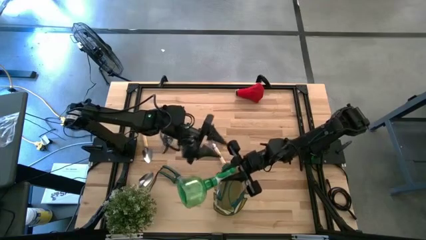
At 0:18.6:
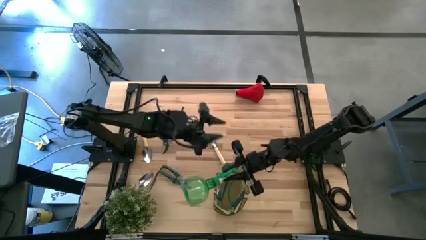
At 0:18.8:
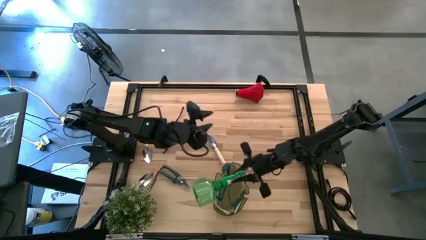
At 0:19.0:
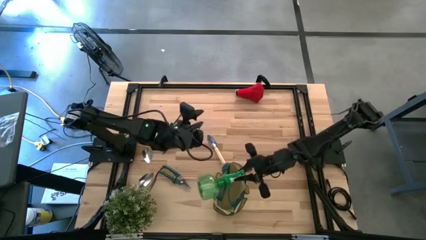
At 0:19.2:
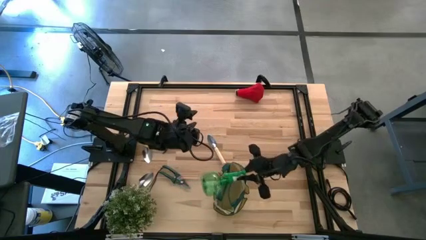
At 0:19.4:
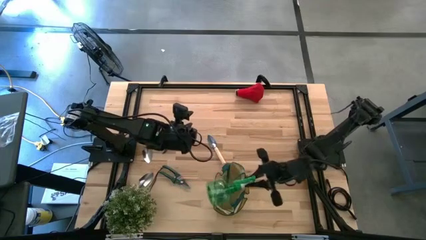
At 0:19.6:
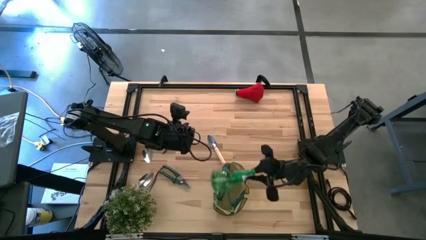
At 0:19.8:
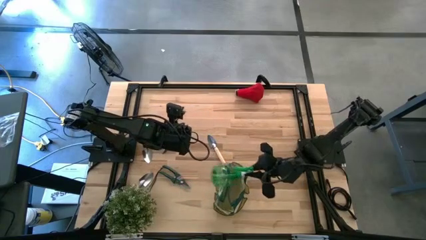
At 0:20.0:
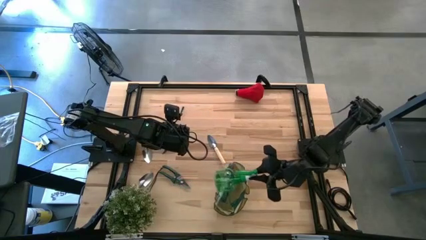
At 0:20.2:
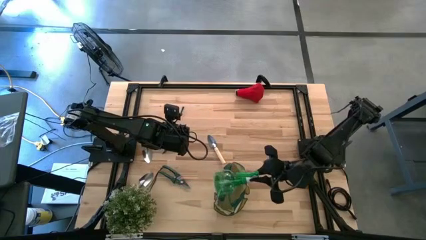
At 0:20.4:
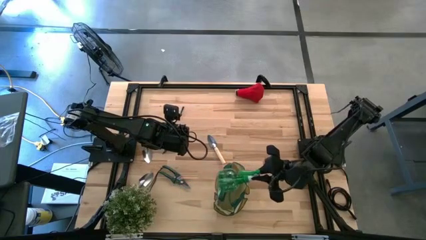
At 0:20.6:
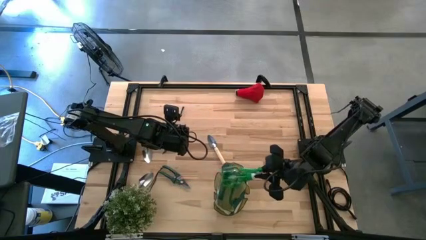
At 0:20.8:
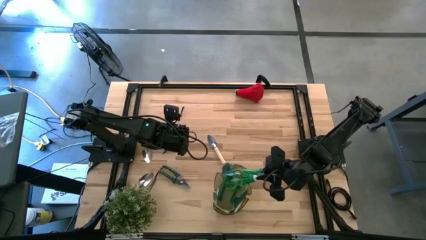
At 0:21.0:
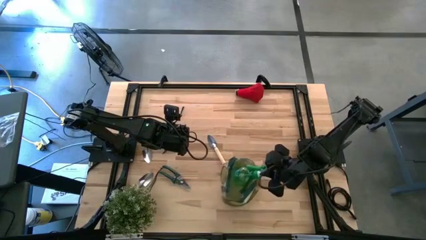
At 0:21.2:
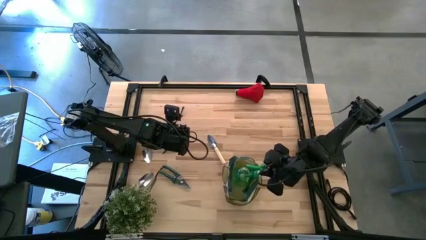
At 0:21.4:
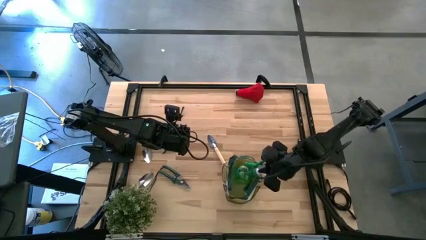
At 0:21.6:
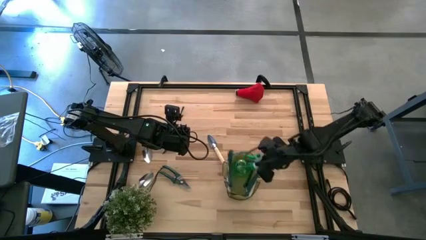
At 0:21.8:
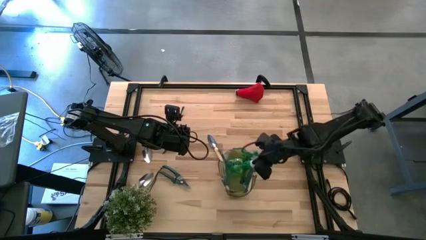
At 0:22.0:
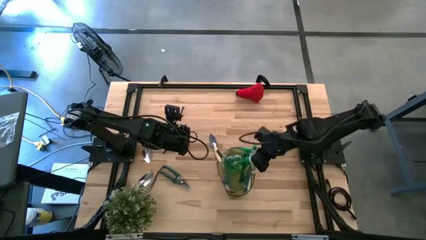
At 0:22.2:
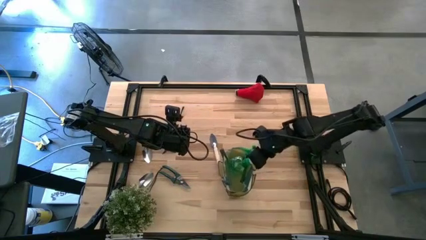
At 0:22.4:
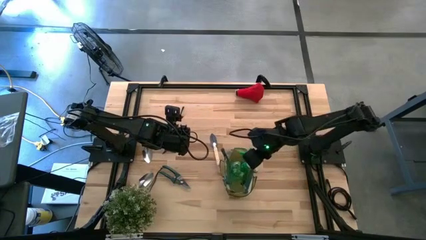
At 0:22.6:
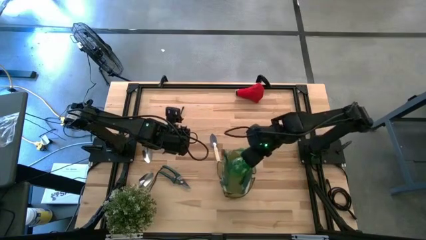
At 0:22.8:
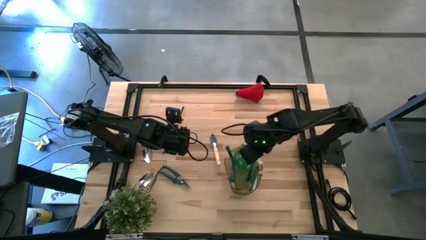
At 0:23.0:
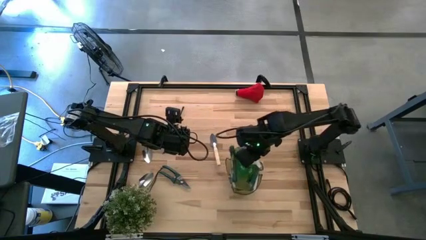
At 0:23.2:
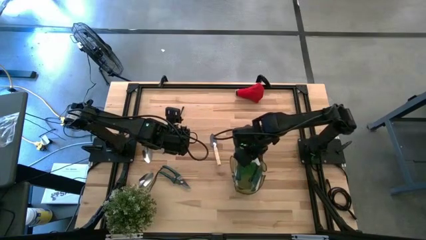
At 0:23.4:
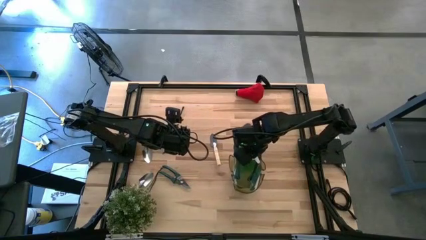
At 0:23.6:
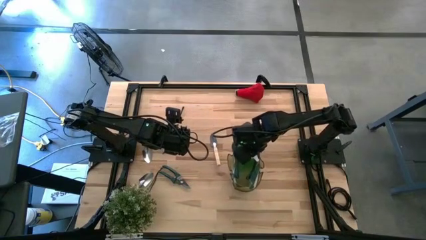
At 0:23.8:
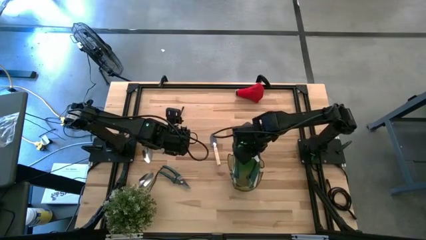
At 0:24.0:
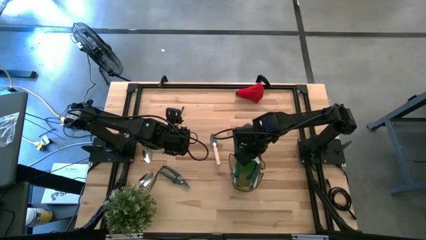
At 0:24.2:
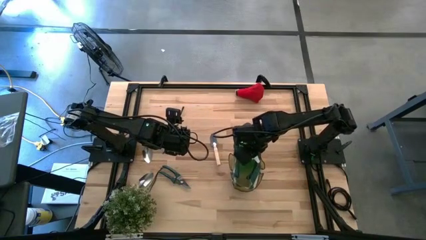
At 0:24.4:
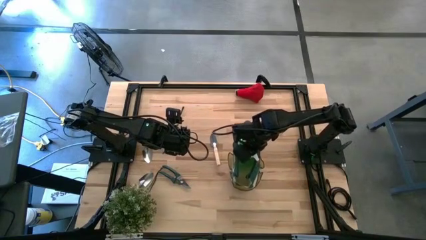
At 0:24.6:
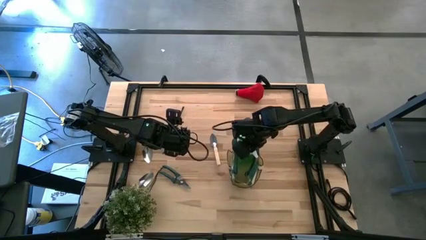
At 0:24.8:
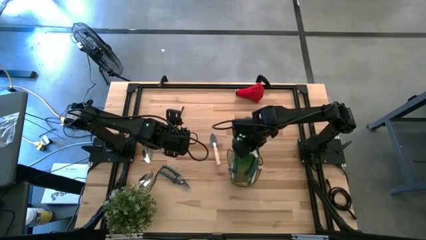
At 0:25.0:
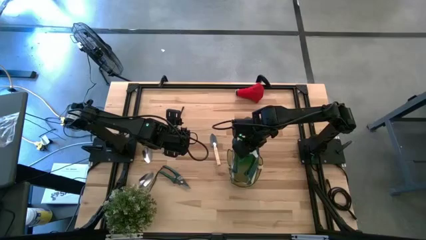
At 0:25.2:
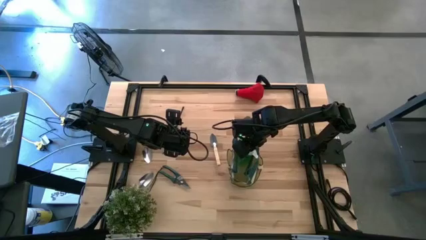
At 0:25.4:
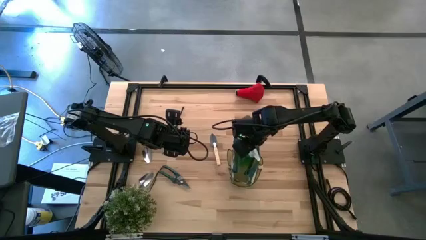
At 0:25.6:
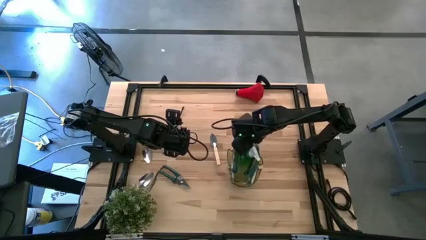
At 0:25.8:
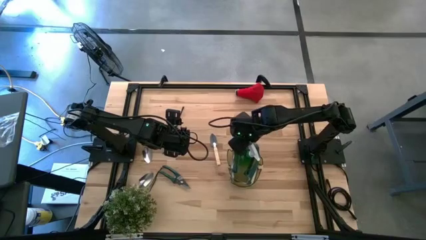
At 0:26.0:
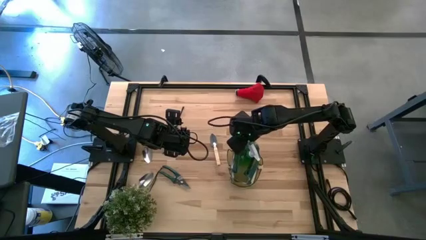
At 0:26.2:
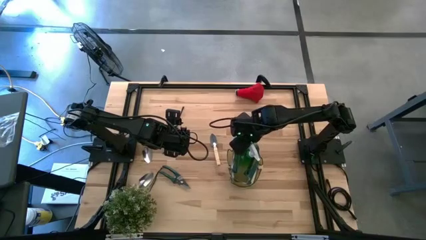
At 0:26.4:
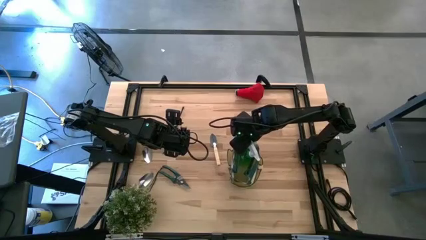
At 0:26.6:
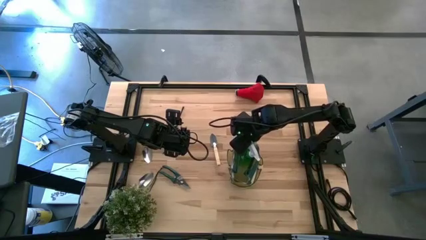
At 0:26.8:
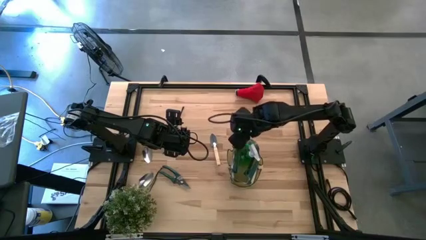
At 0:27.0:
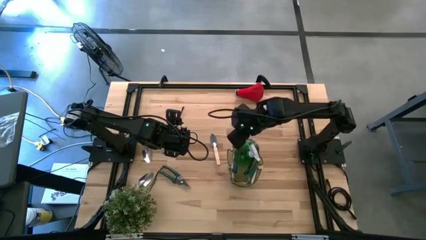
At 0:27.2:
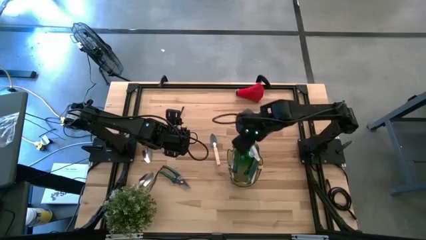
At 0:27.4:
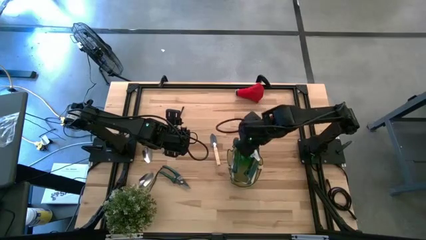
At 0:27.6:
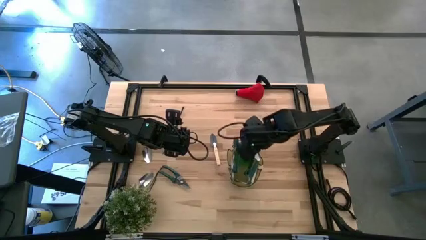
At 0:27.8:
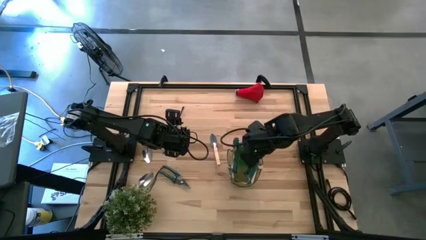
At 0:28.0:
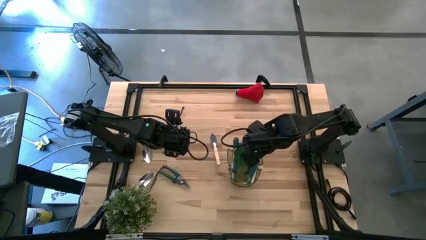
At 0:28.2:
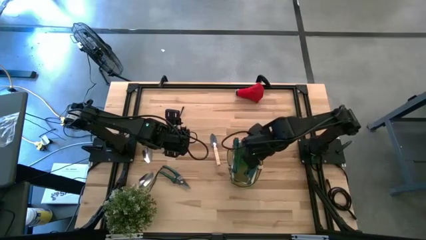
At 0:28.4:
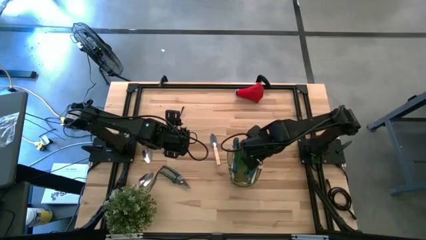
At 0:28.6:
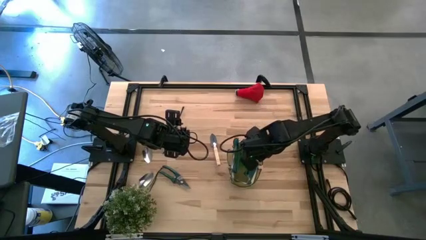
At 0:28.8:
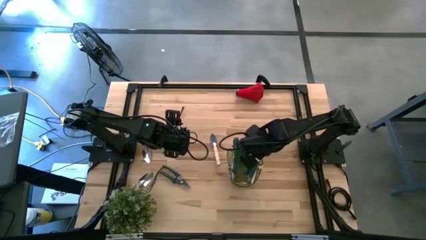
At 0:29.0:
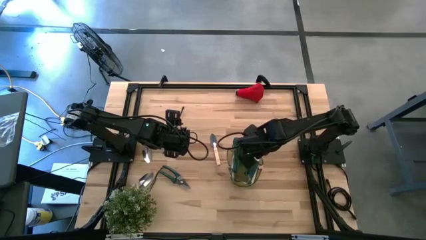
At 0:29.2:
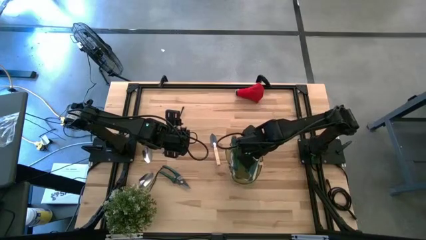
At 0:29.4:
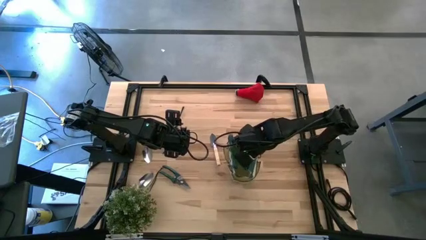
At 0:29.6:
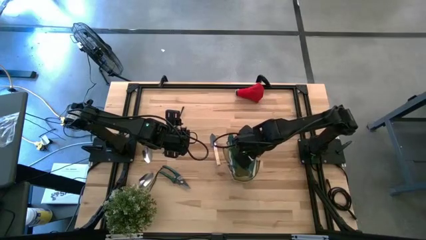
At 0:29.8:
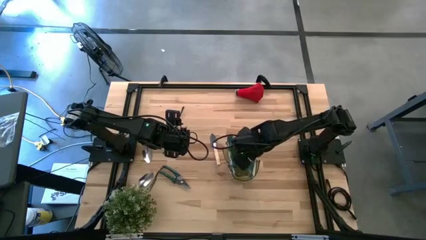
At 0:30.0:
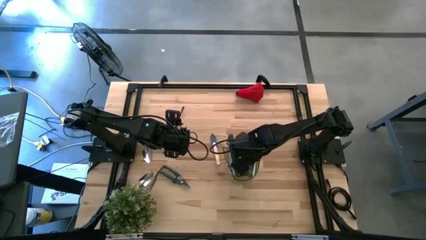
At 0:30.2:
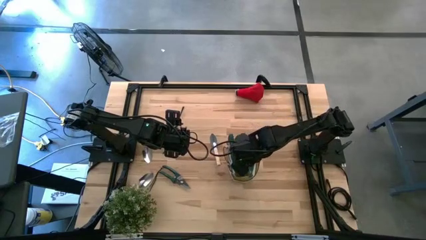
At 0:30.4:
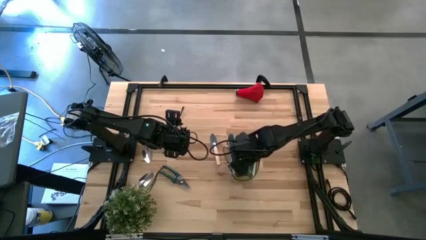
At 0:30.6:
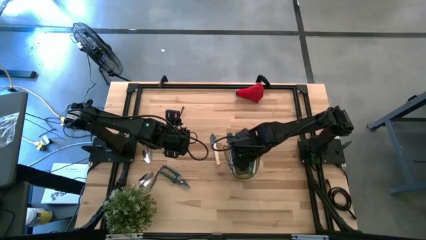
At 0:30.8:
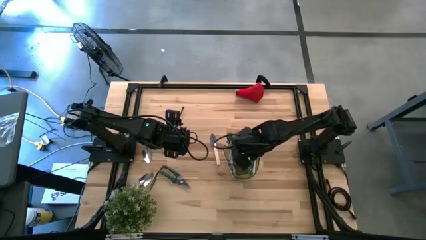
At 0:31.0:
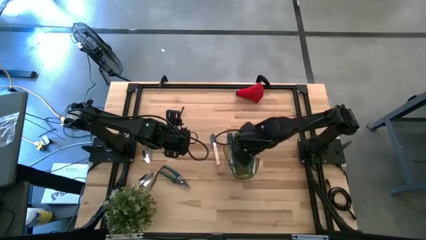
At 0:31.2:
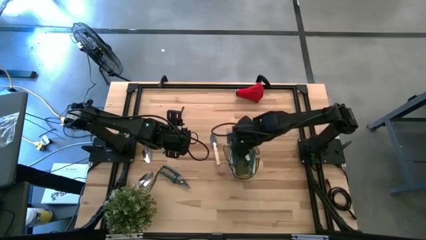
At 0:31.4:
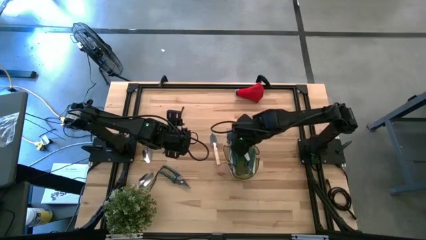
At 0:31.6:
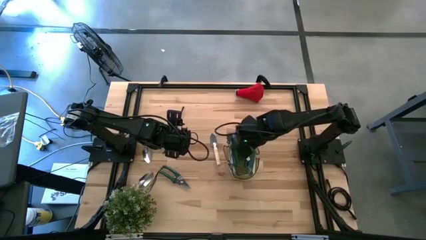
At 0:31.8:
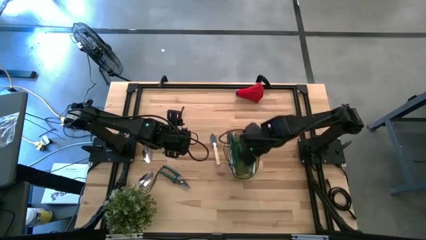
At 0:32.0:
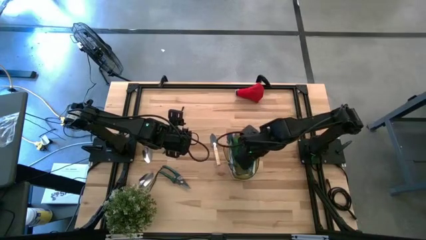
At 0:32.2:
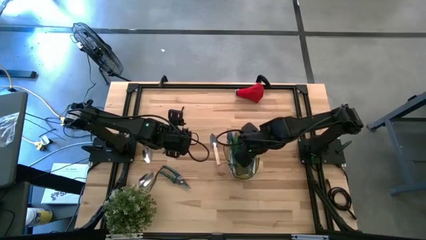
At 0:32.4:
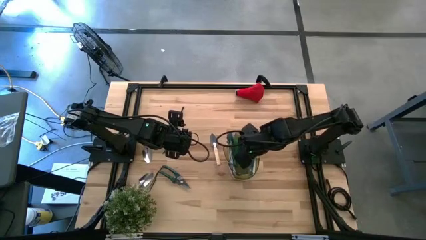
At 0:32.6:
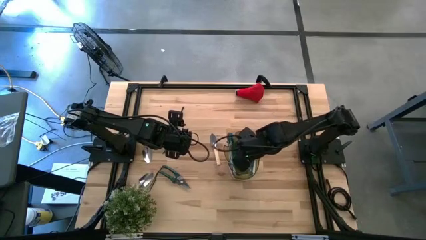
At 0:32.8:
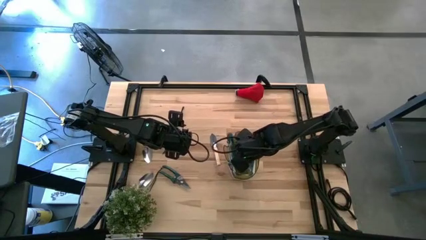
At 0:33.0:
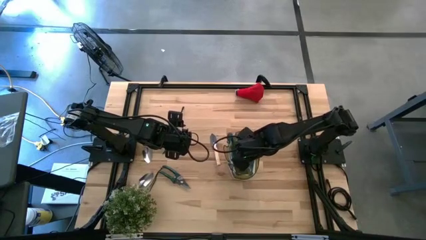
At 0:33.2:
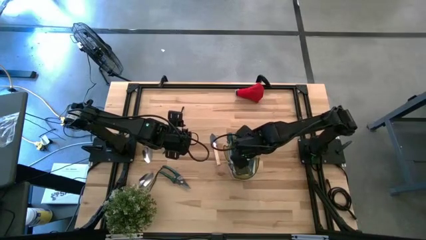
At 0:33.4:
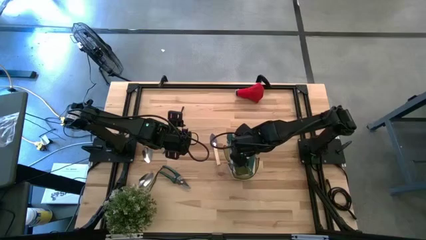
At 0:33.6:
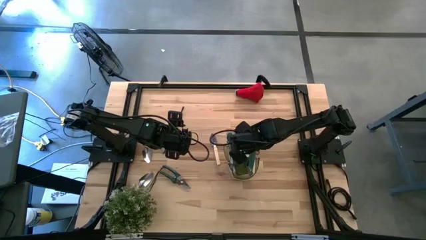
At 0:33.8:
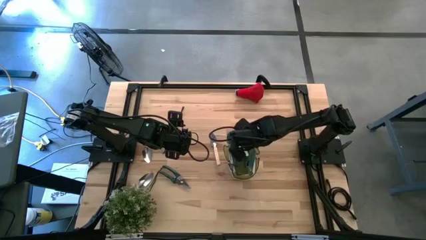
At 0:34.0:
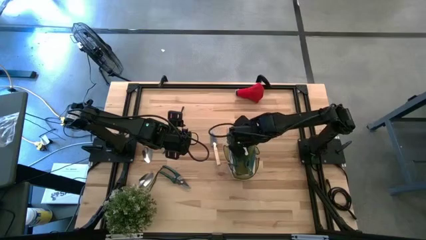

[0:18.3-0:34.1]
Task: Pick & Place Garden tools in Gardening bag
Put the green spray bottle into the green gardening bag
